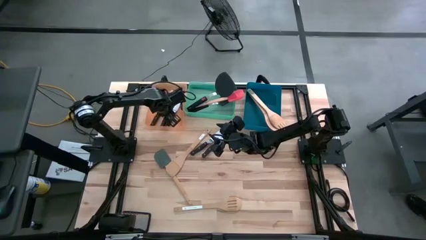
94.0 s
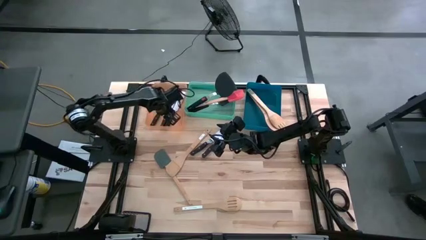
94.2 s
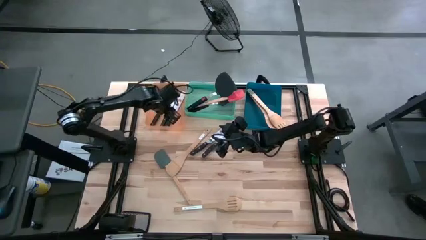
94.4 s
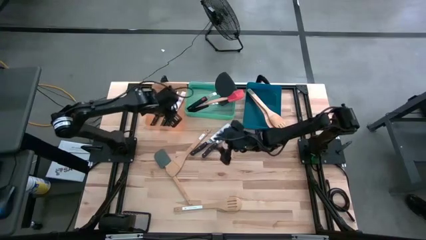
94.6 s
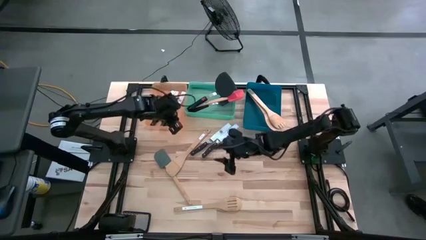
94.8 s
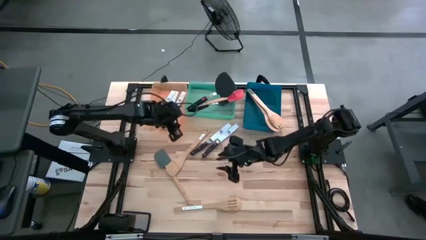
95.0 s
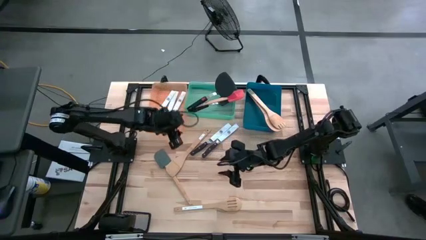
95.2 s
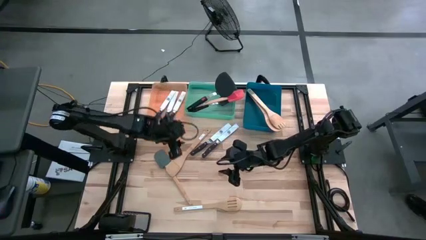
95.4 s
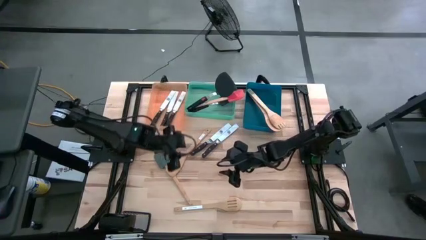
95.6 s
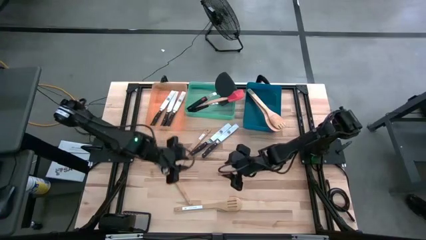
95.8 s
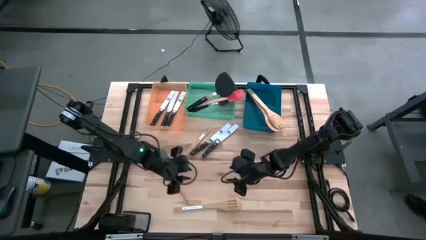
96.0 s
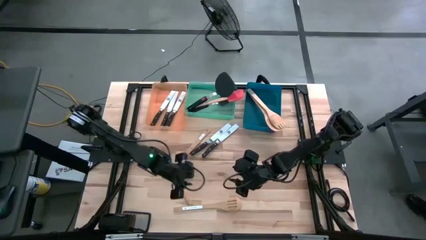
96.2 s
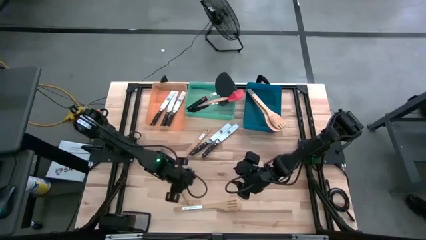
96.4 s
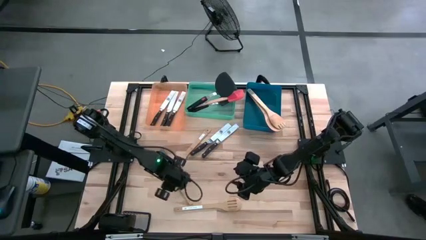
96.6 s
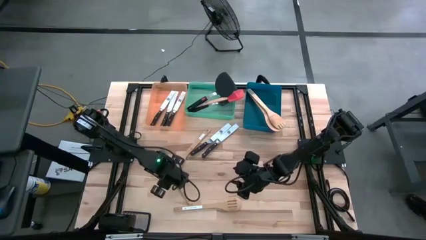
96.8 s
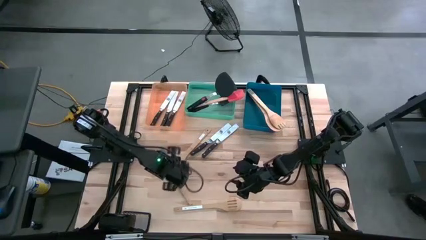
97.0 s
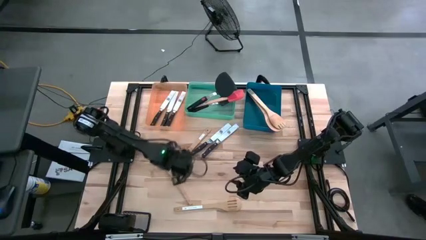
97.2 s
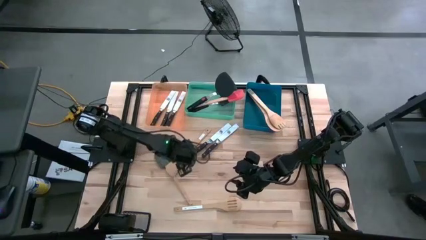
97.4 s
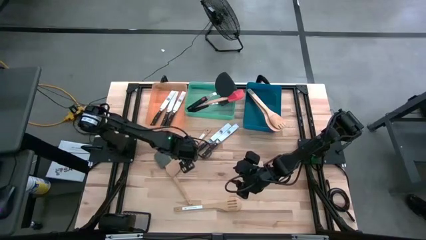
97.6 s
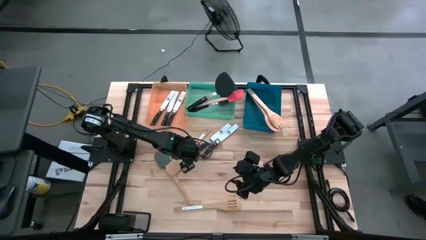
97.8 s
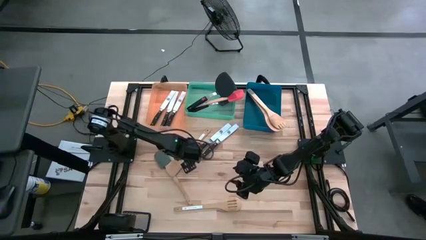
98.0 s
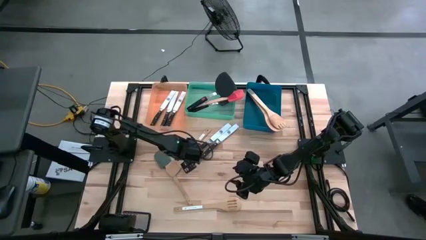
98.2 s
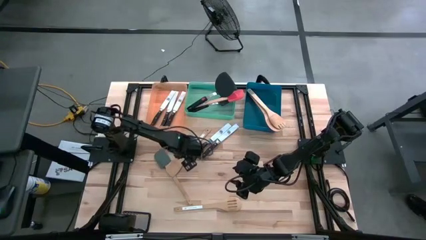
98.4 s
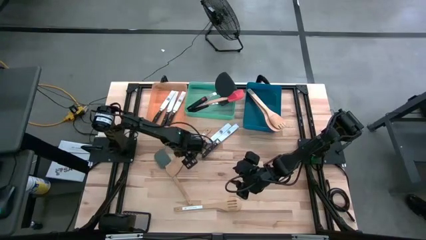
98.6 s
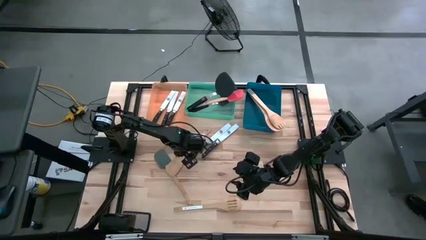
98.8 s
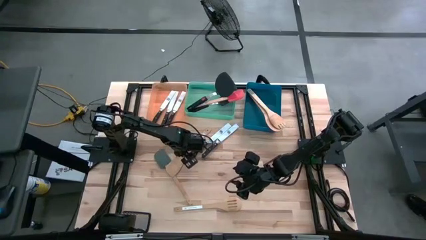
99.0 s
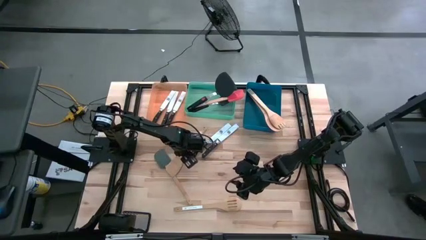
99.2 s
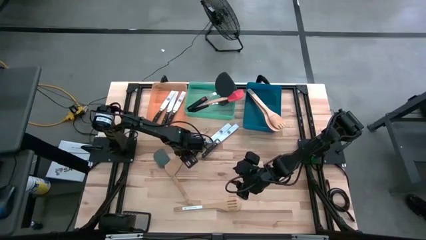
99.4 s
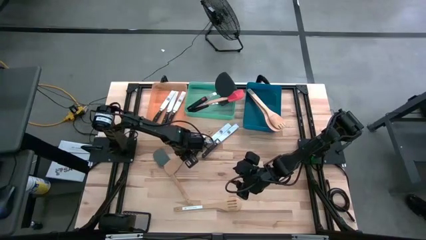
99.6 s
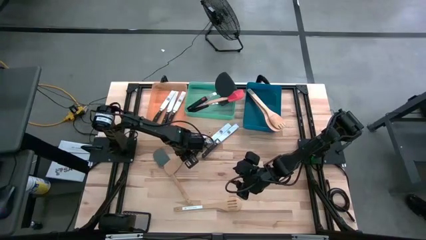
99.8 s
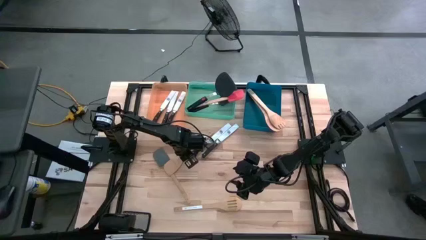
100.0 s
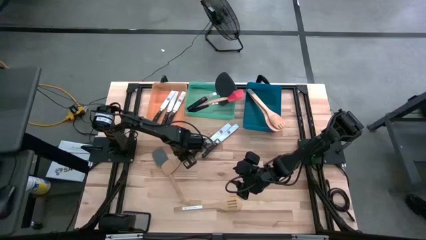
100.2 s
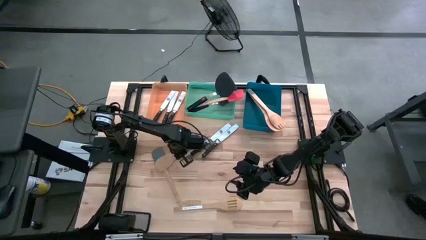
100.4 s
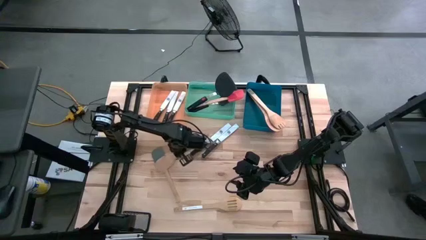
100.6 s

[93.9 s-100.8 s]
Task: Pick & Place Kitchen Items
Put the brown serving spoon into the blue bin

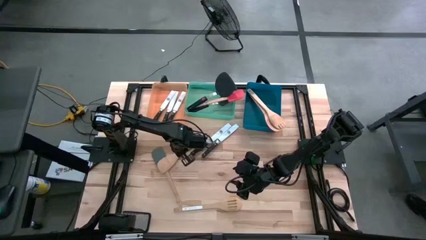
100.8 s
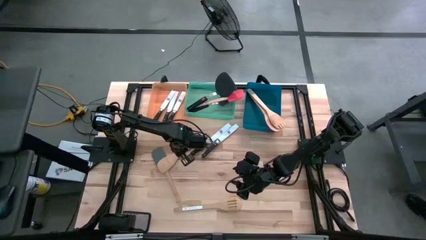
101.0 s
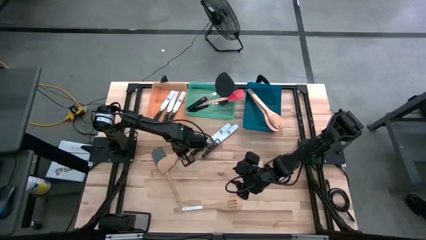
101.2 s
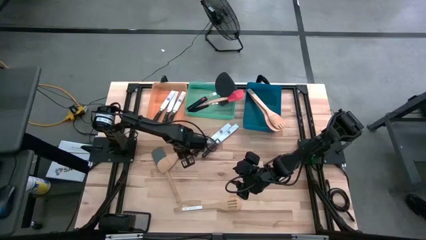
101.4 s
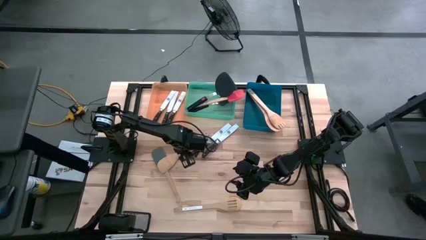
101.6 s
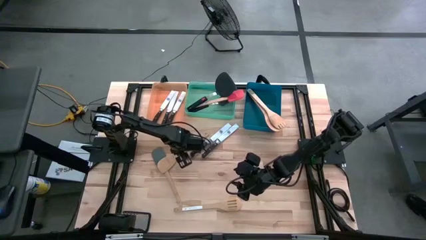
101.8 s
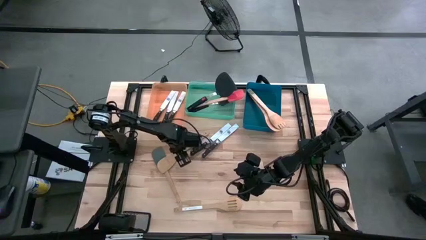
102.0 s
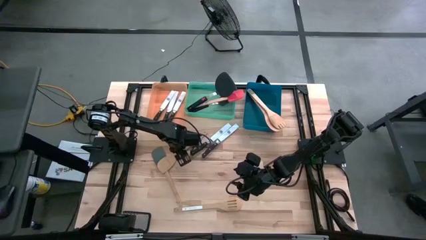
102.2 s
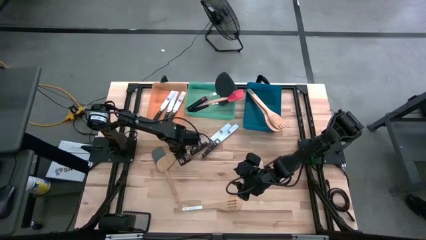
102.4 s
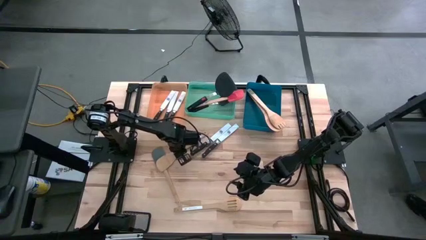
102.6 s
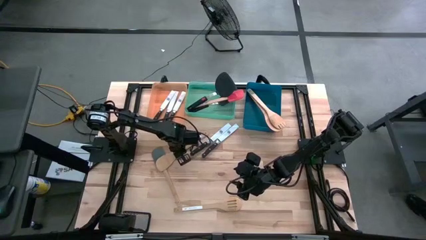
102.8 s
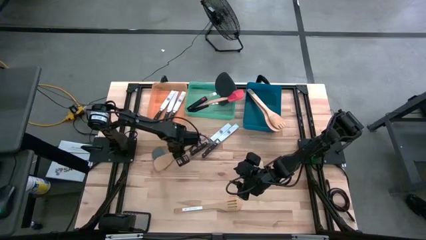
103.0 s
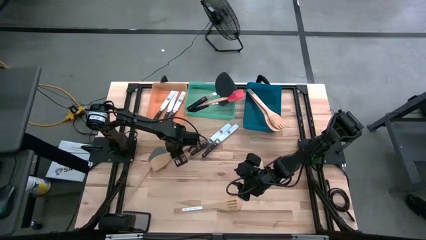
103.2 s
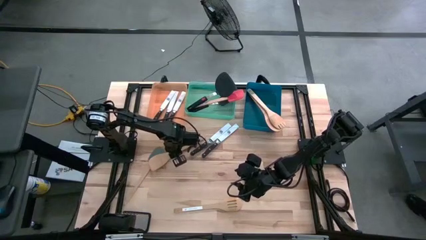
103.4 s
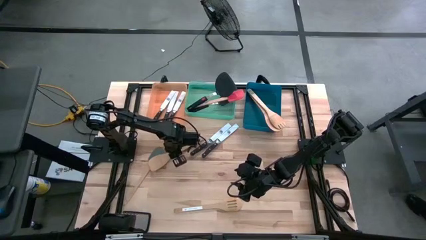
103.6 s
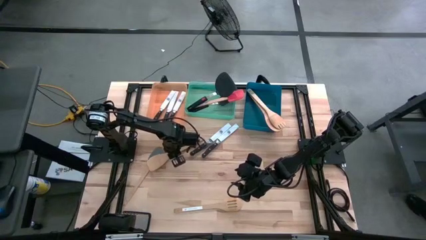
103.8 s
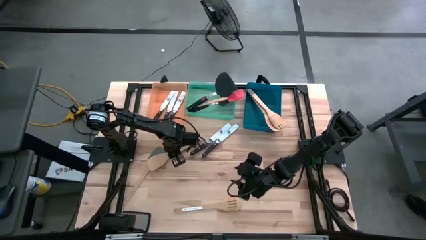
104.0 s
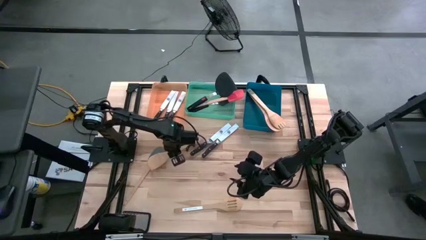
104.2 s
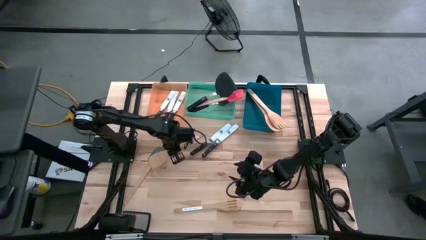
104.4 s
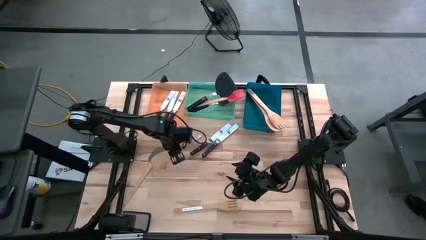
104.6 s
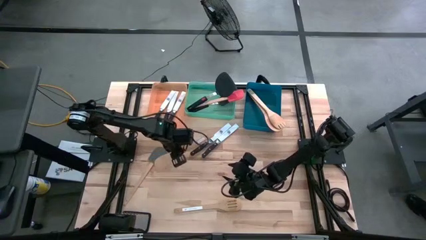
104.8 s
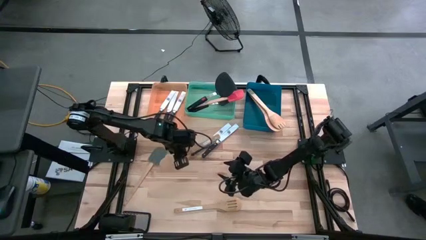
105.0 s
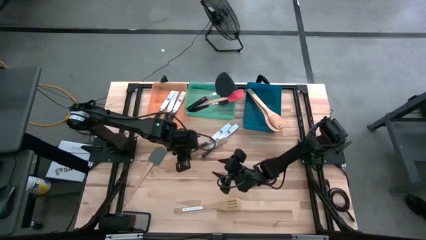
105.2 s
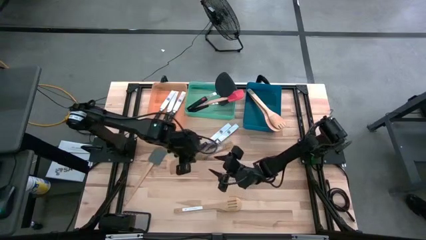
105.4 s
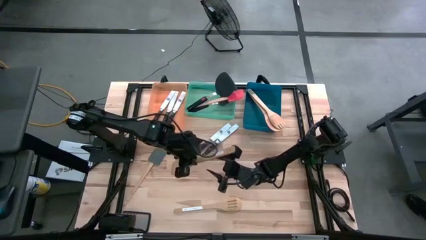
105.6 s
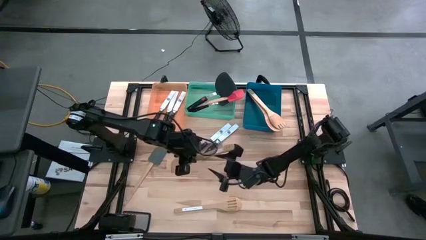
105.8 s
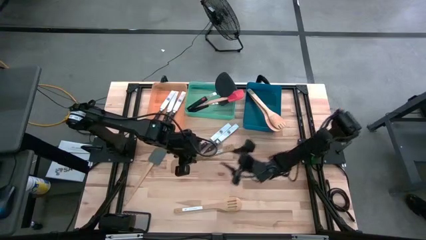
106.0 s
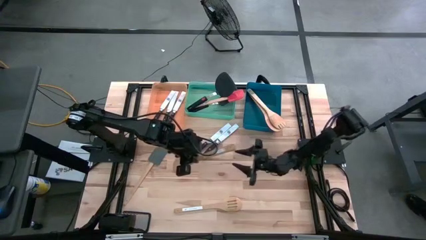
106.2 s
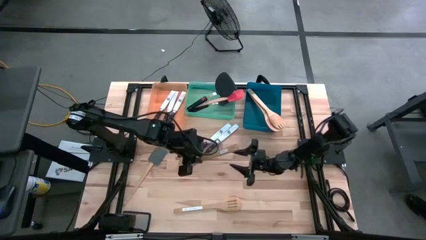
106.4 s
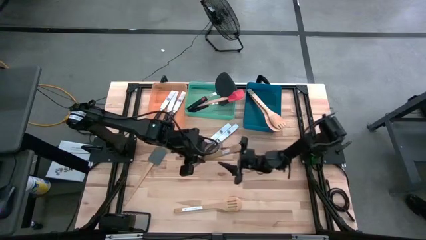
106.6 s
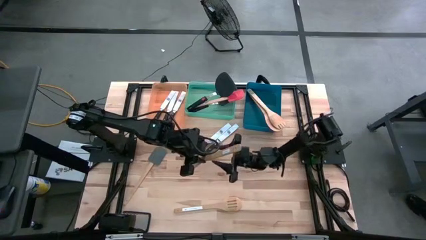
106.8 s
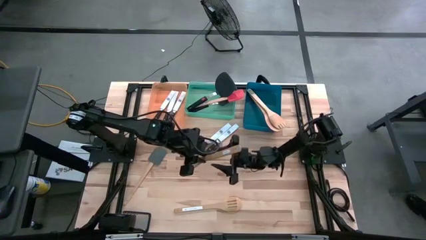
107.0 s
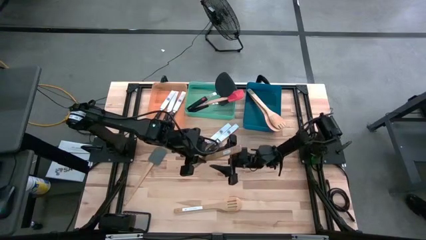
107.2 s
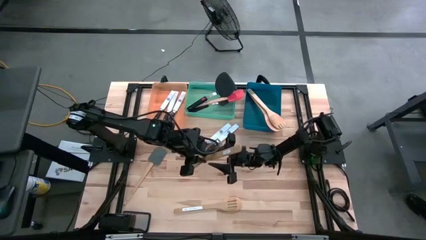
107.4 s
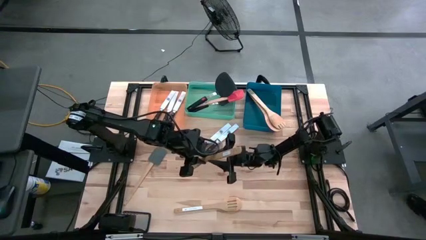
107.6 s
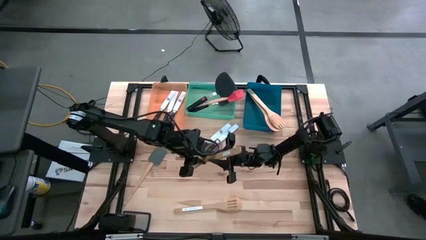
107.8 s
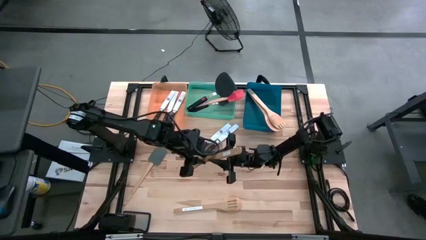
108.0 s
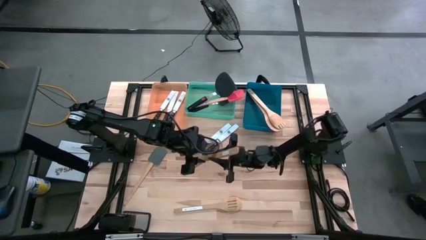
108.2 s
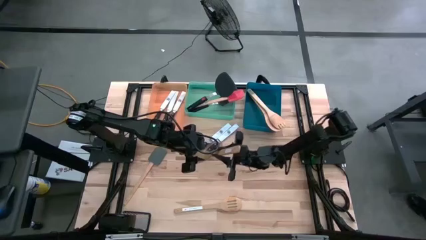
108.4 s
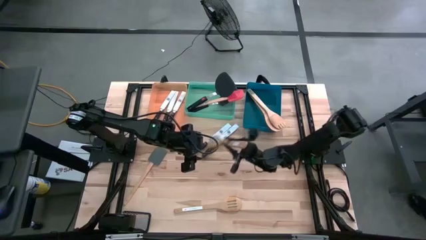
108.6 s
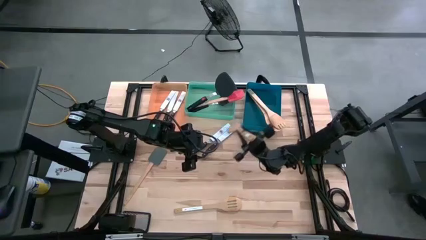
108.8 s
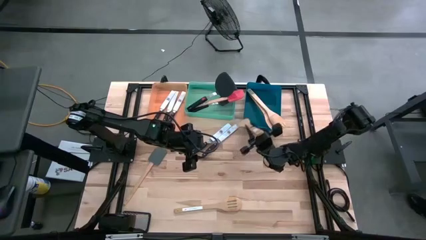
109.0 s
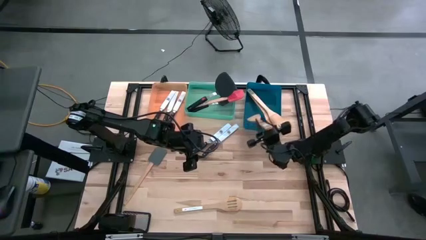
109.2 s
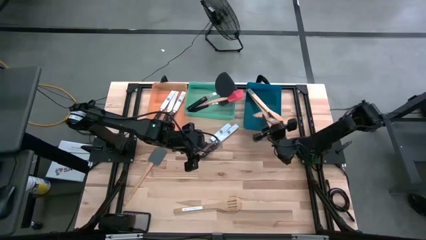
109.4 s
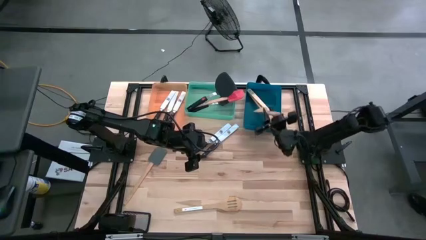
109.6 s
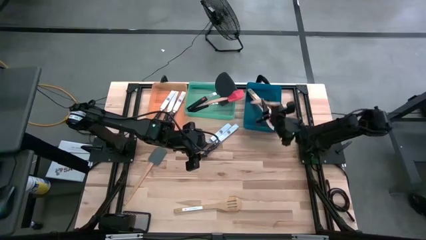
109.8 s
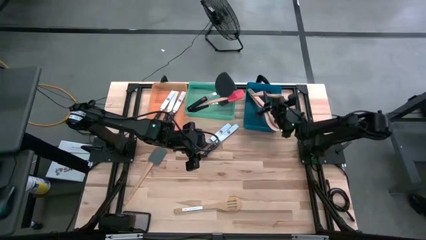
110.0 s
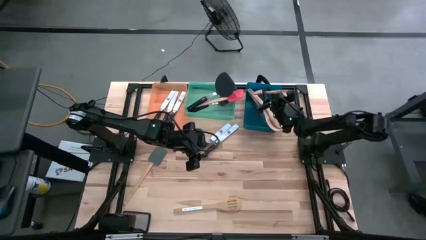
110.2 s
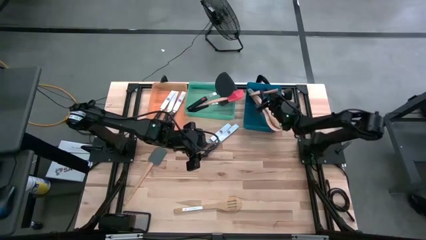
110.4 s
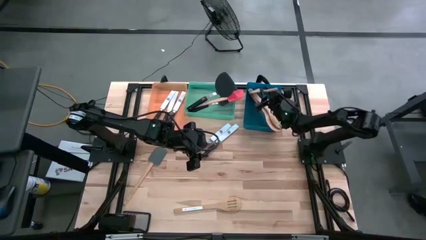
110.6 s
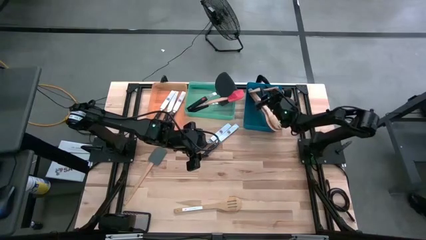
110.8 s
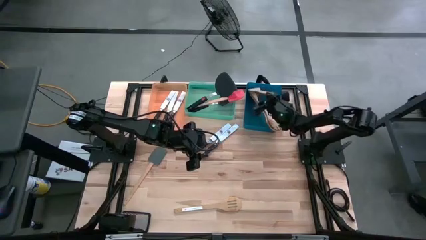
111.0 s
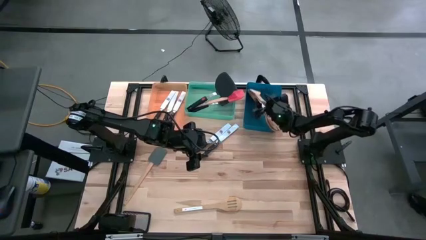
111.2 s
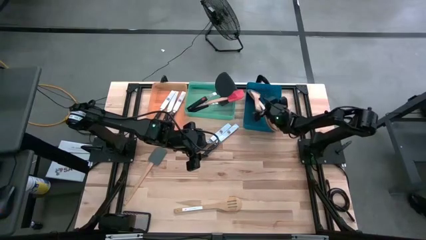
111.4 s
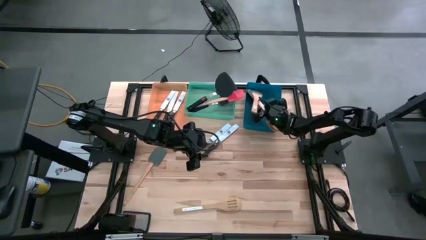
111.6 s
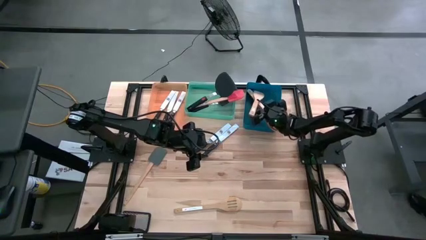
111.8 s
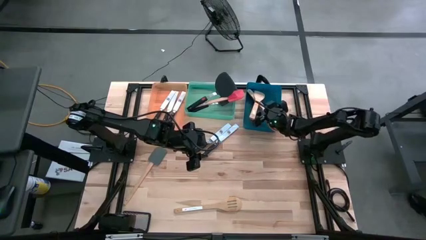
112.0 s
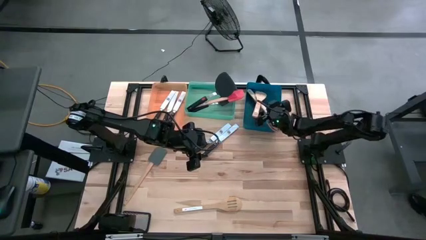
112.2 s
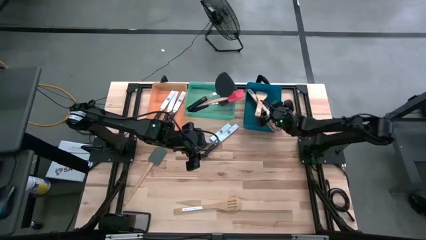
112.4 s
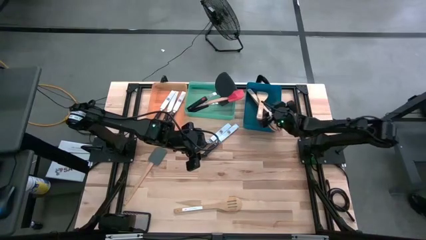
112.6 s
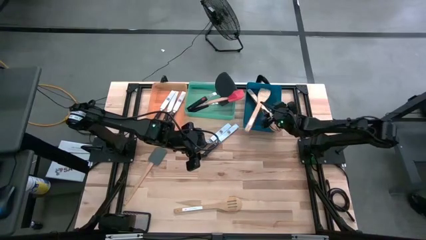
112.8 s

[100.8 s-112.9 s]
Put the brown serving spoon into the blue bin
